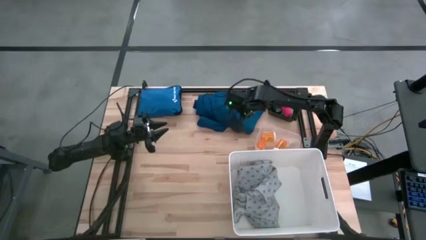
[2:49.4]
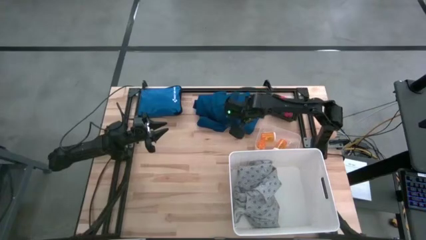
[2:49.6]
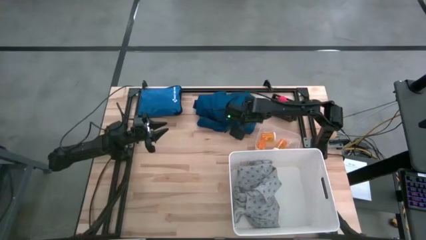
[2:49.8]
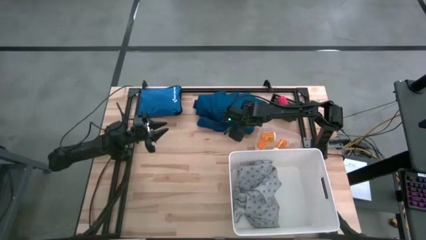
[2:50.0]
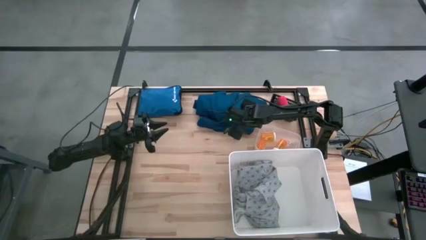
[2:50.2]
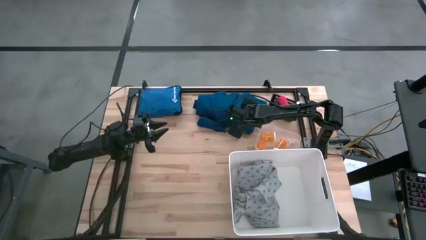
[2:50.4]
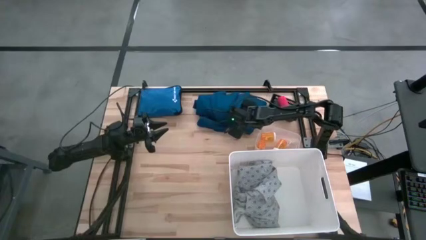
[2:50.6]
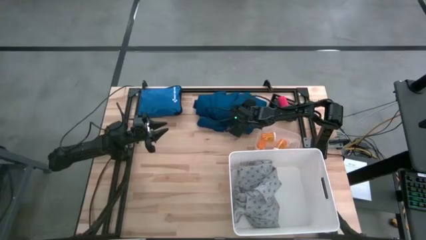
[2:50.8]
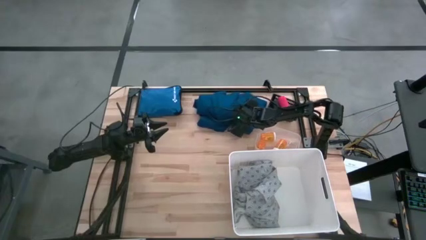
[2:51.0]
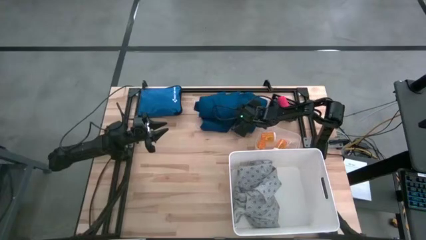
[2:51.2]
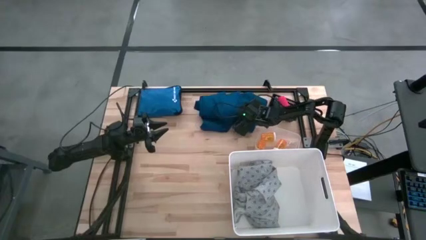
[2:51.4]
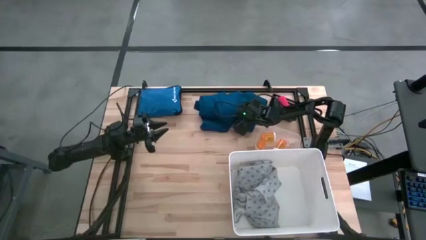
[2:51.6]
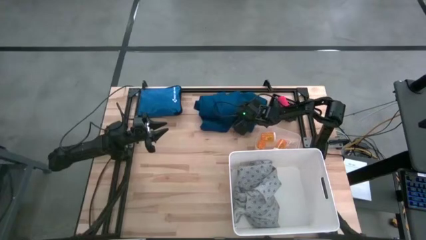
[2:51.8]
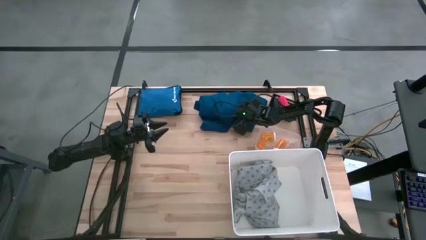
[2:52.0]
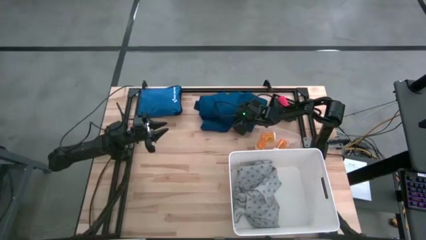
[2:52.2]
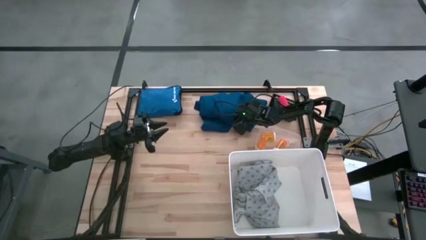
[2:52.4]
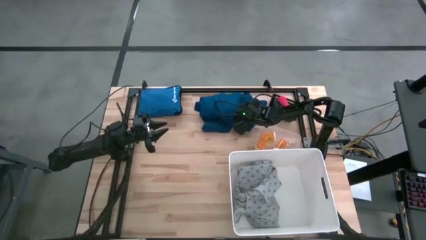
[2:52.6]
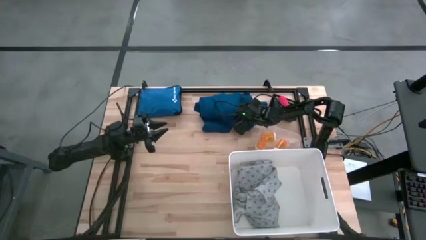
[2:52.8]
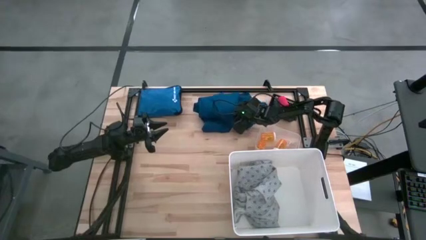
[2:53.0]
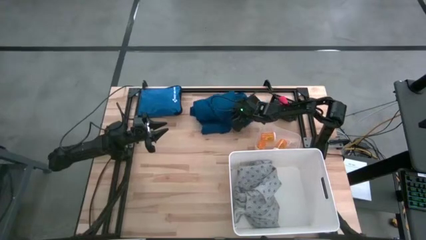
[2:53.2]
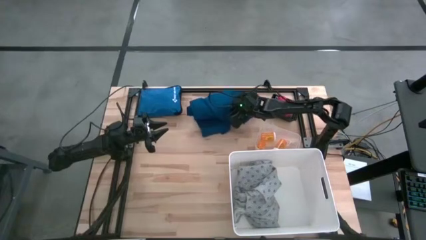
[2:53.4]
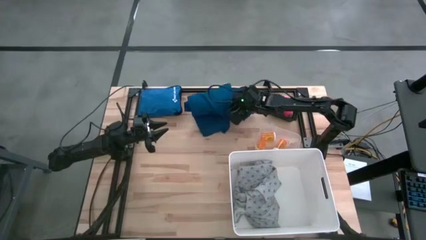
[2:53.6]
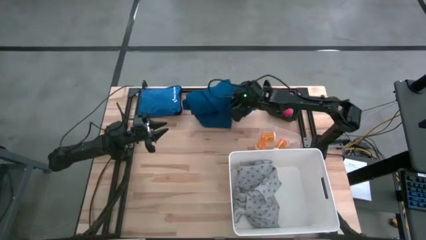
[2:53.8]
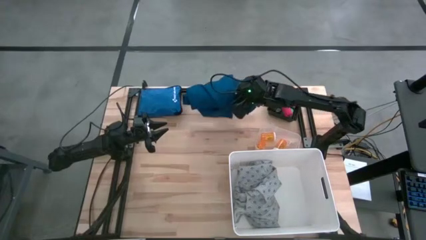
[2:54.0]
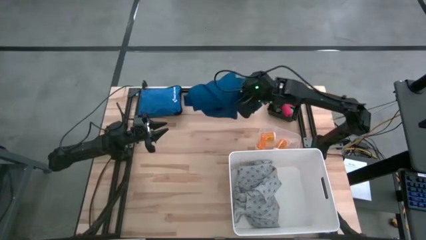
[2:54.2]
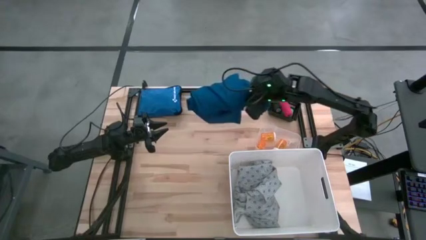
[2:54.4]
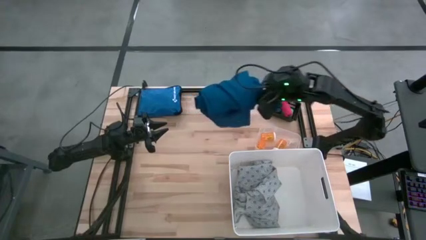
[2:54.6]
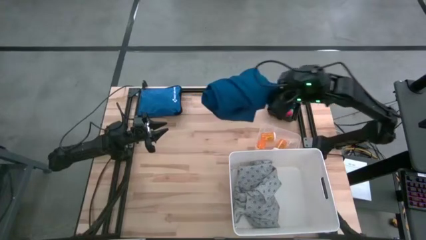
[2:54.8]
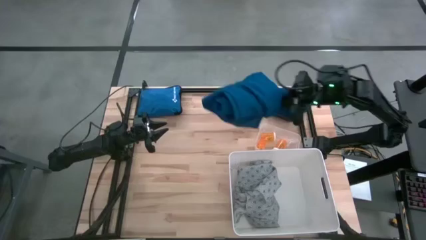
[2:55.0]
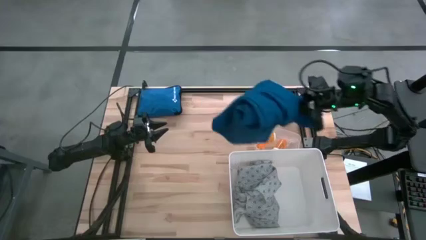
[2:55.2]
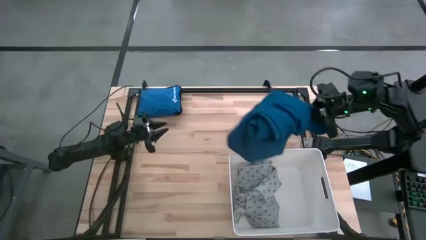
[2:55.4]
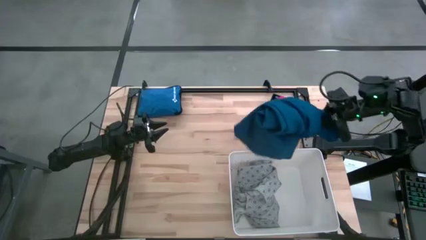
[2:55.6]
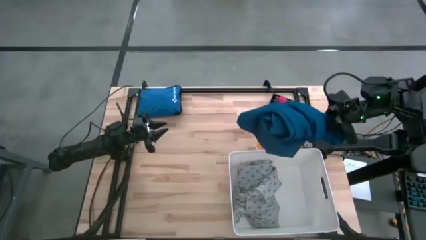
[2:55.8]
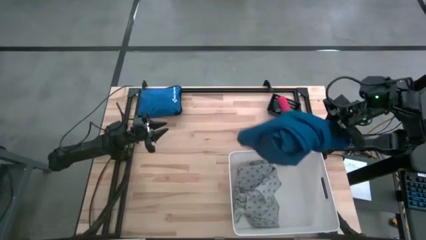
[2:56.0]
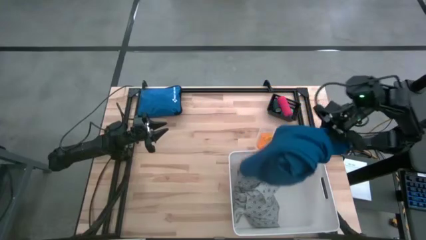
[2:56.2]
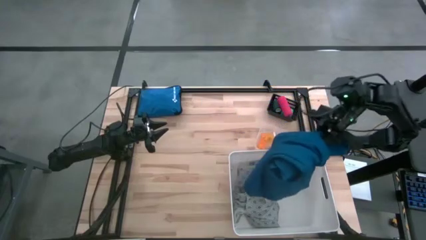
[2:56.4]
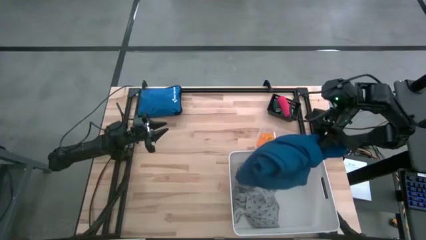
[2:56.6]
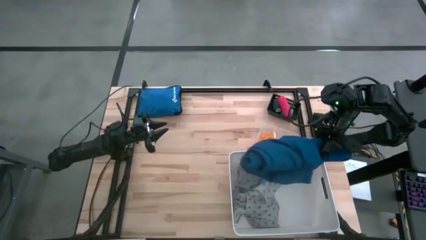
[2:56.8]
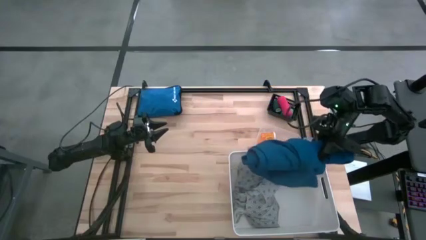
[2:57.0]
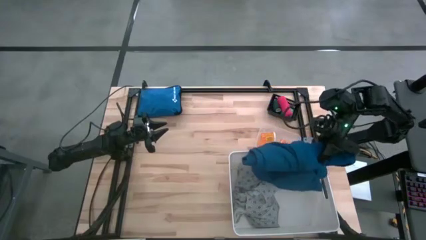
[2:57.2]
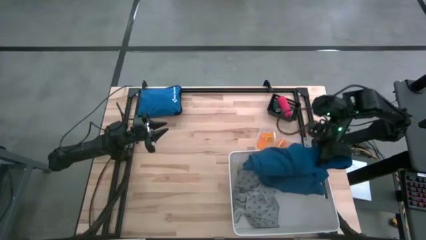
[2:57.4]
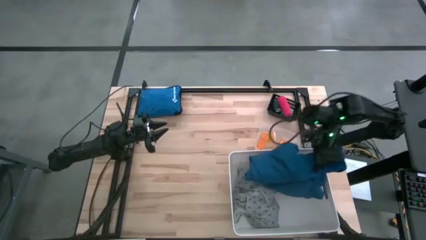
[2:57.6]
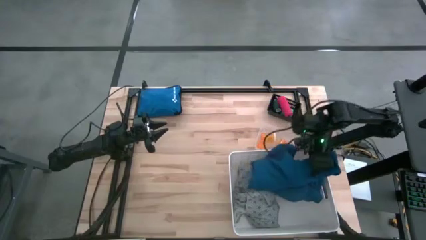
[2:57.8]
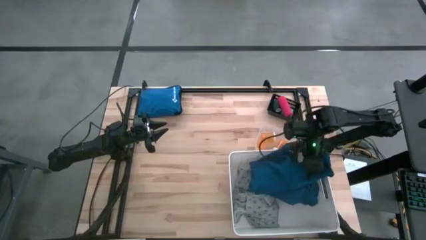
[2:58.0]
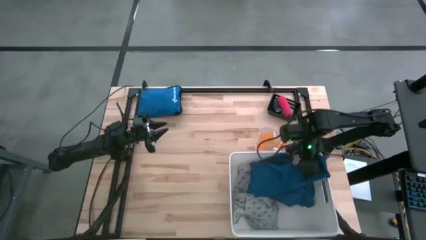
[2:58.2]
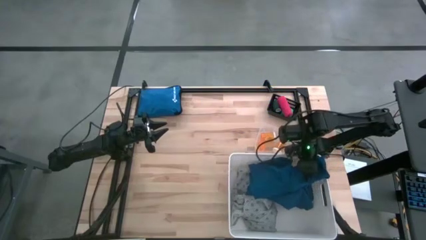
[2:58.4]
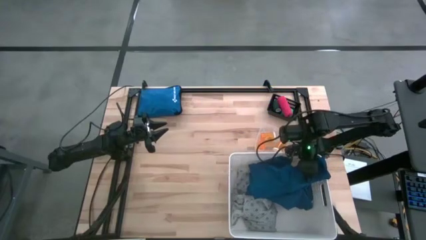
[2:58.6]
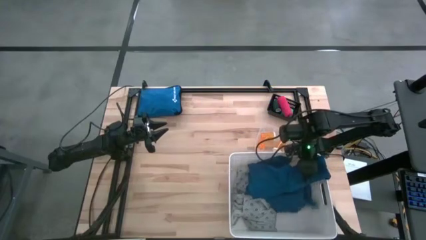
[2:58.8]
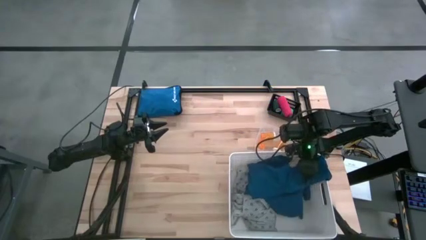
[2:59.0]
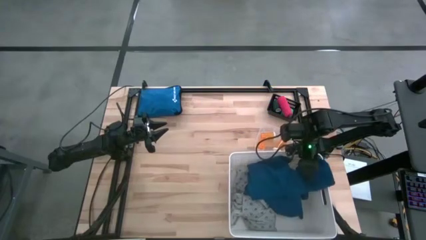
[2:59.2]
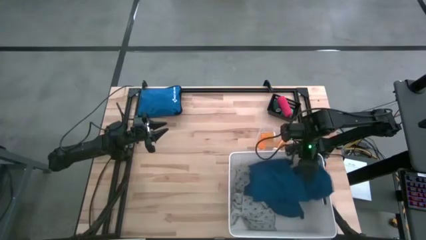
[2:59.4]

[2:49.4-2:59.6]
Task: Pick & place medical supplies in basket/bin
Put the blue patient gown into the white bin

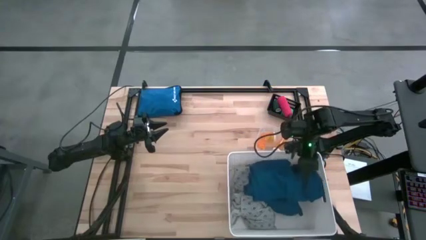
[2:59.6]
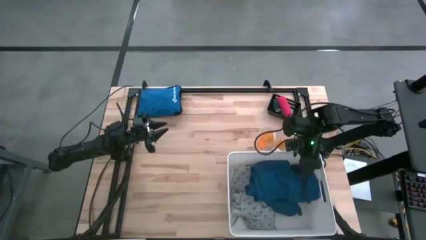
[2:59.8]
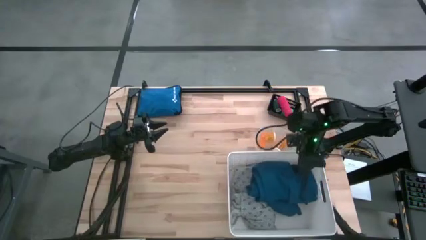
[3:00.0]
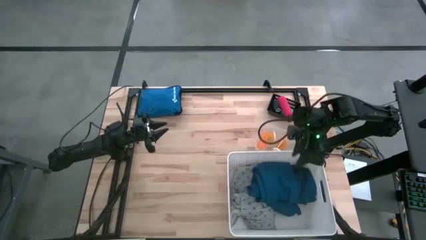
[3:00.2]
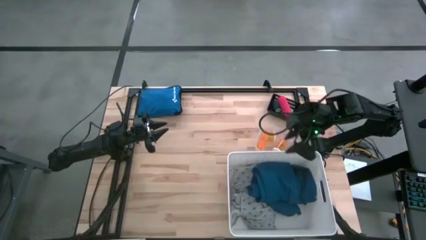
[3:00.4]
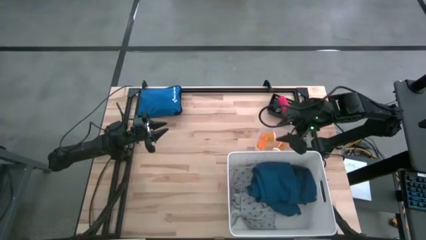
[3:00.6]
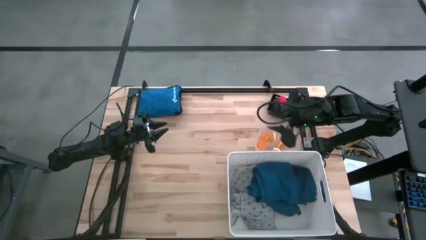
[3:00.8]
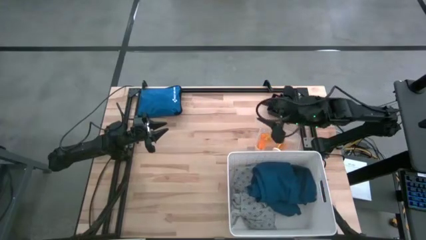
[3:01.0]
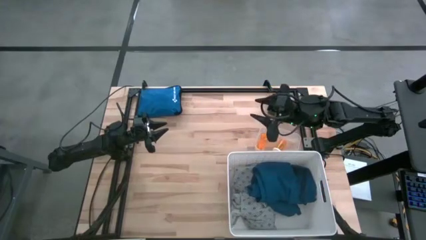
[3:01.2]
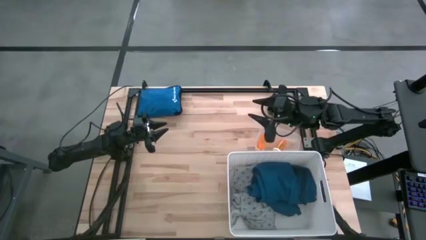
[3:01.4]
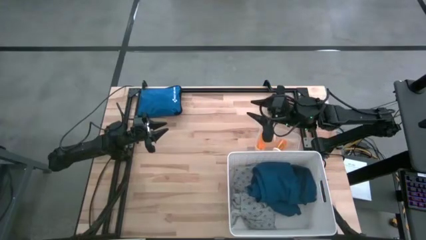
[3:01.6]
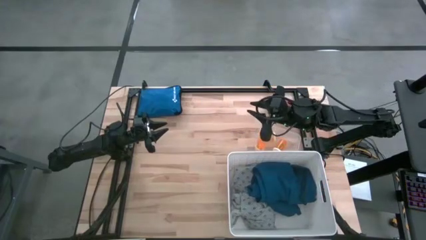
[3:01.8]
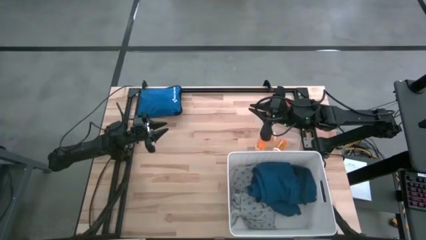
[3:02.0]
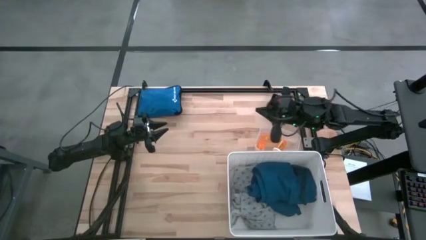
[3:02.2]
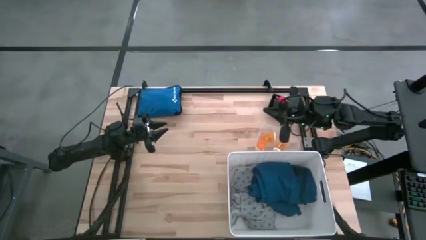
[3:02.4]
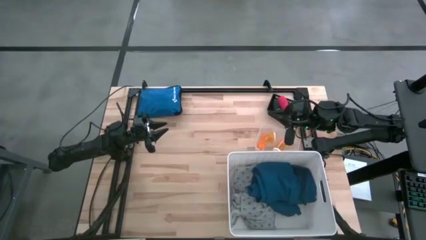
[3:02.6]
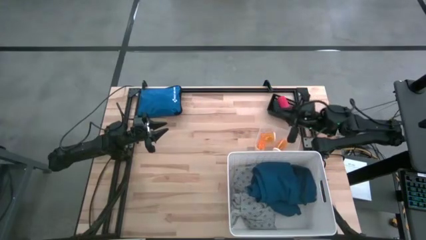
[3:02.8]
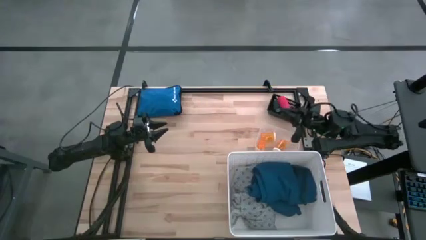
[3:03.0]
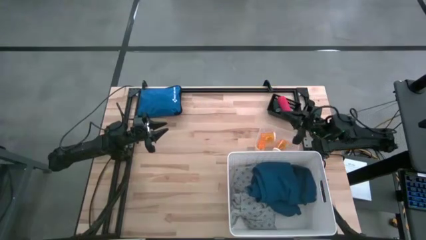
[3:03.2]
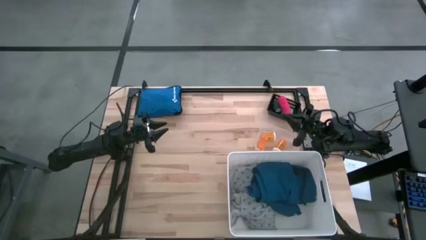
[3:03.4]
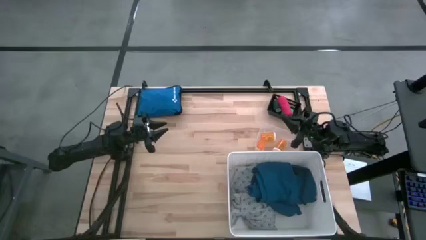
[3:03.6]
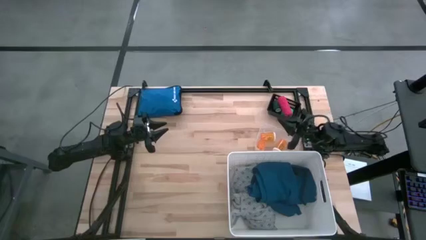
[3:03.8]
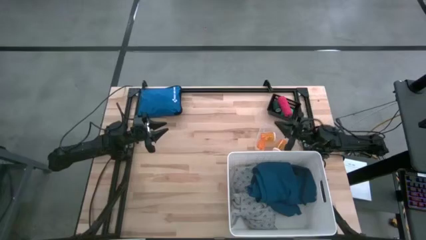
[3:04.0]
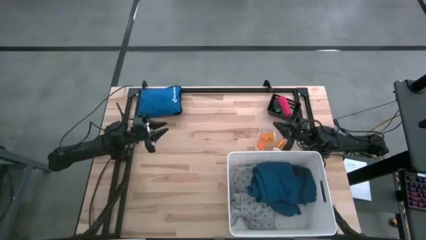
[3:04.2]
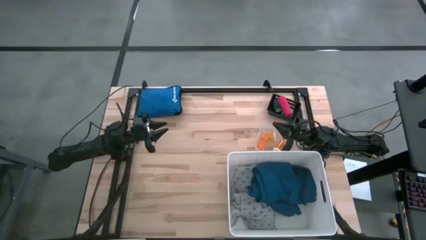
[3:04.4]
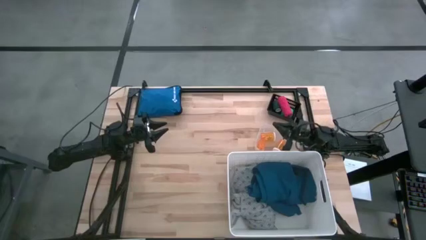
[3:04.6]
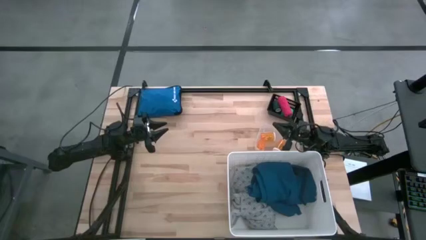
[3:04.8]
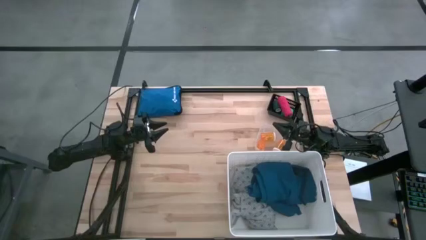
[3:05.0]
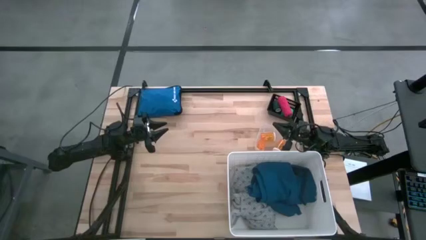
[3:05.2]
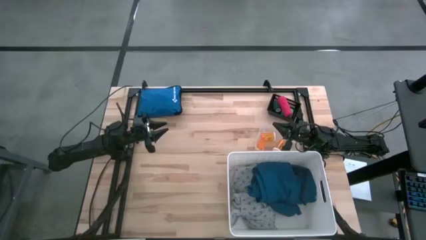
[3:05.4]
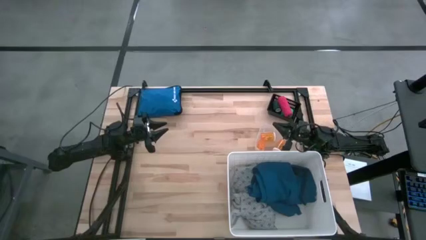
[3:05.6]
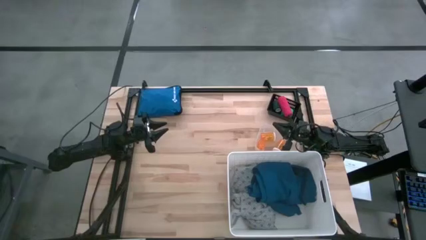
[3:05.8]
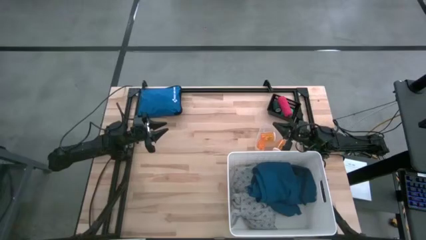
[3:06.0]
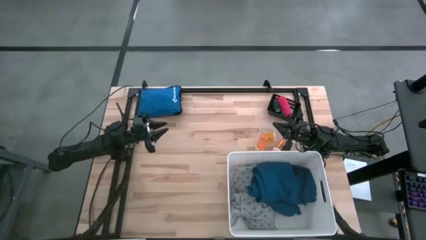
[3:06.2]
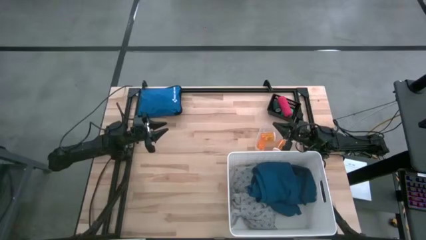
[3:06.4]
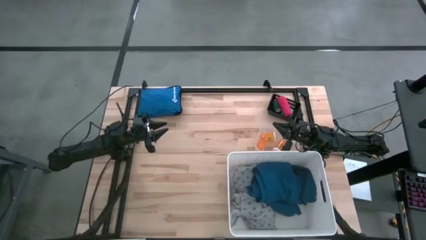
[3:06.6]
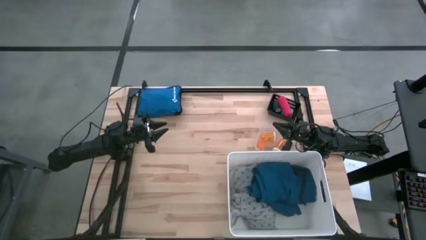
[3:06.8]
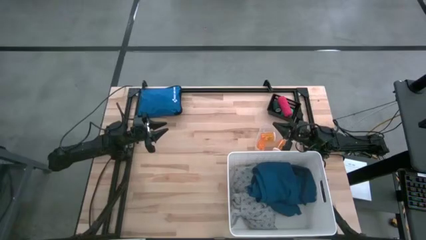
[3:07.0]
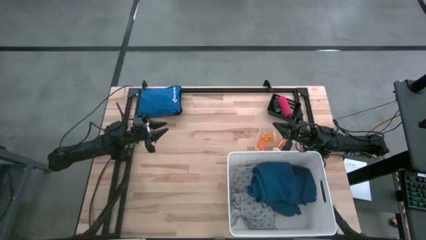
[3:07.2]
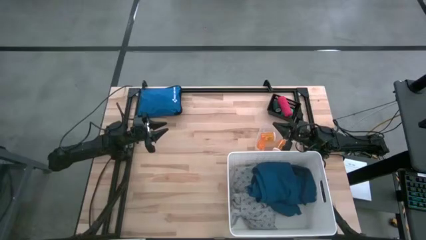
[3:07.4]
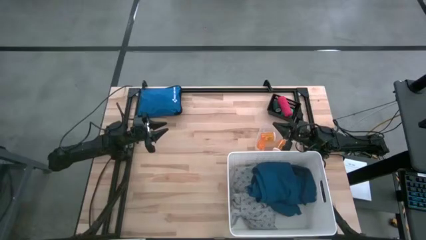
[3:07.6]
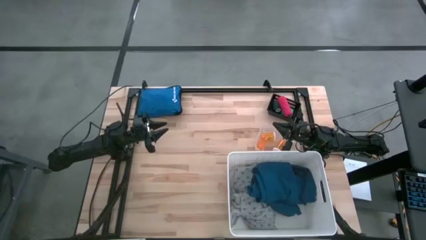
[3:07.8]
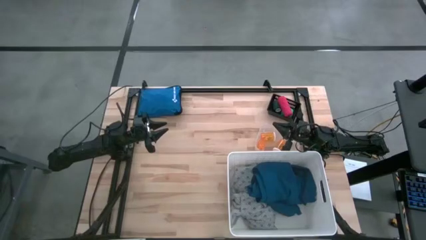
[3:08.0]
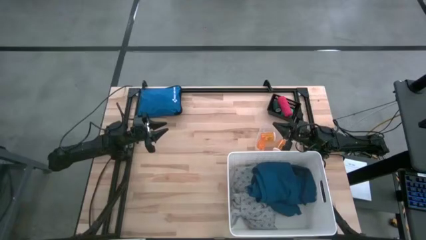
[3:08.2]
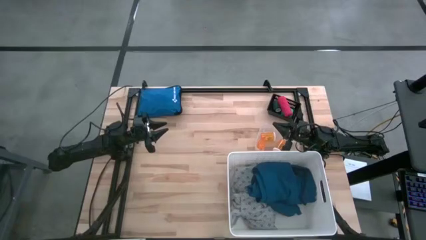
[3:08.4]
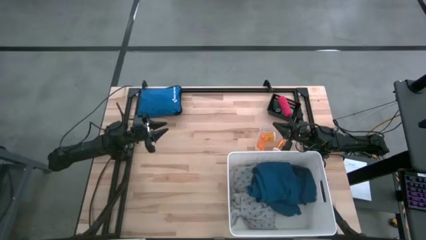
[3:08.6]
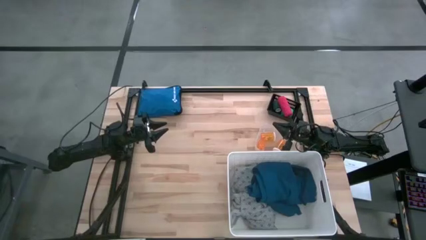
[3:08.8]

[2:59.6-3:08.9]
Return to Home Position
